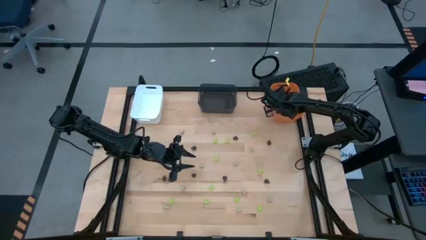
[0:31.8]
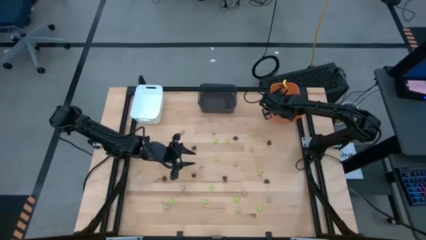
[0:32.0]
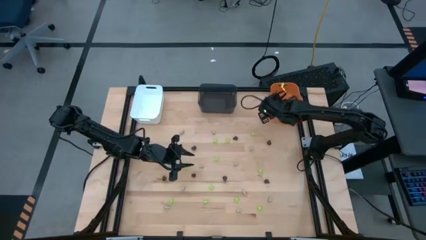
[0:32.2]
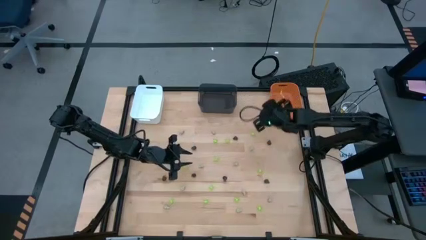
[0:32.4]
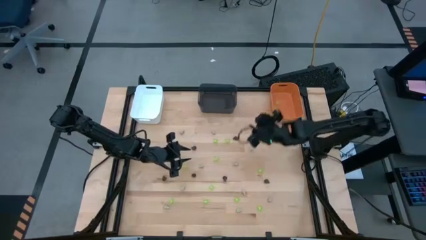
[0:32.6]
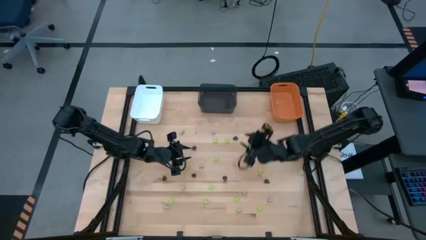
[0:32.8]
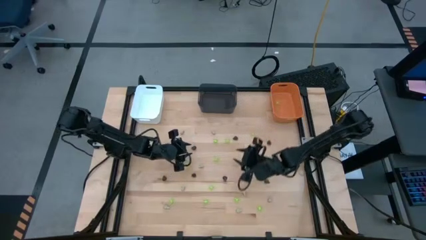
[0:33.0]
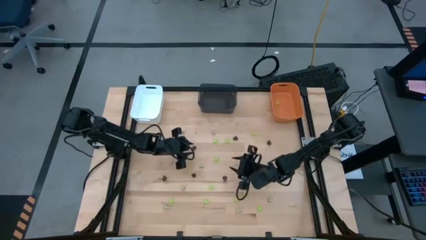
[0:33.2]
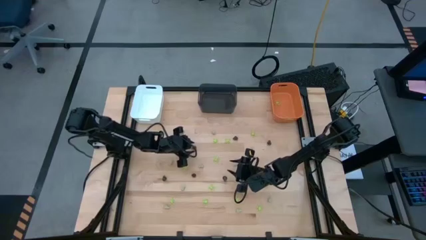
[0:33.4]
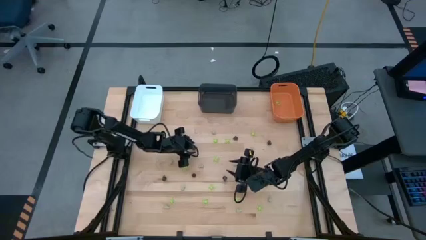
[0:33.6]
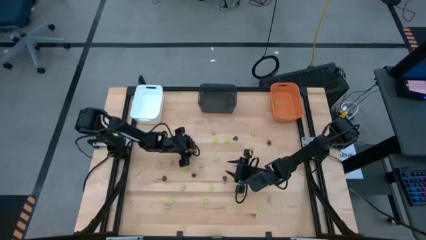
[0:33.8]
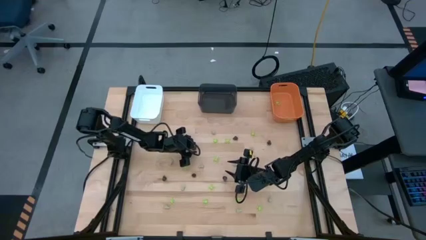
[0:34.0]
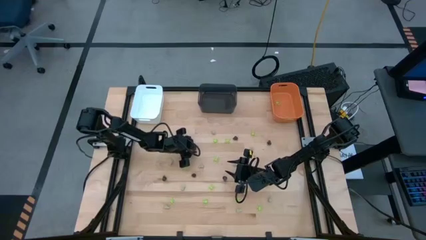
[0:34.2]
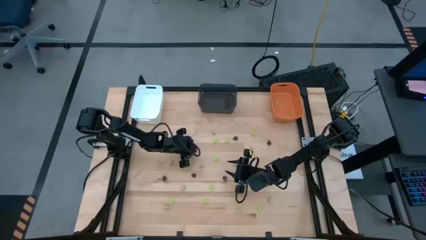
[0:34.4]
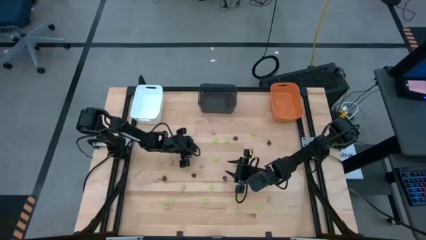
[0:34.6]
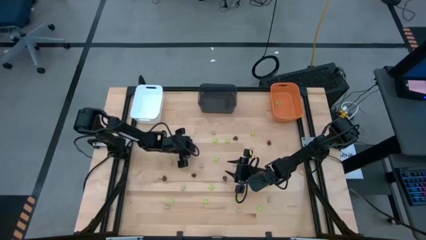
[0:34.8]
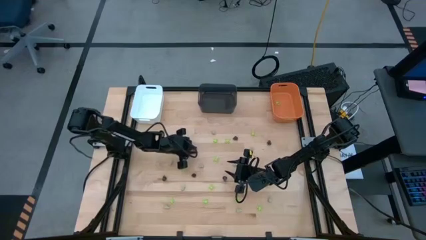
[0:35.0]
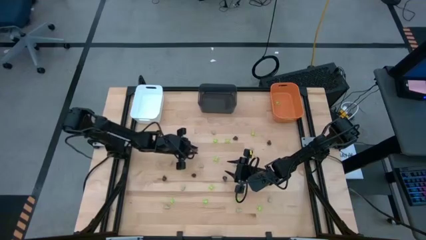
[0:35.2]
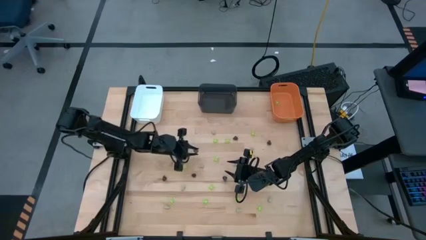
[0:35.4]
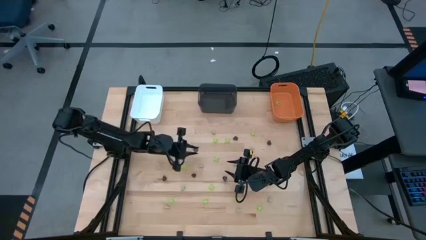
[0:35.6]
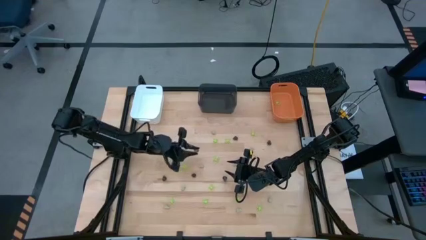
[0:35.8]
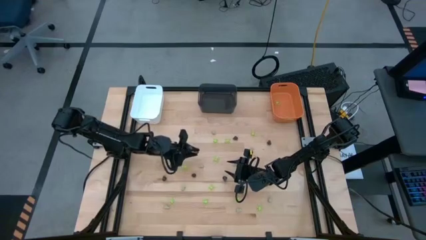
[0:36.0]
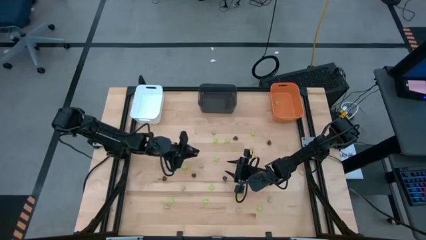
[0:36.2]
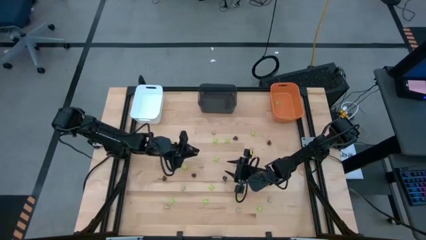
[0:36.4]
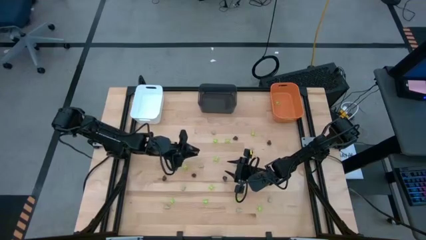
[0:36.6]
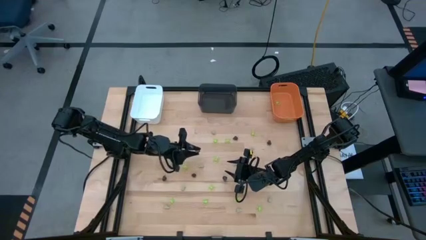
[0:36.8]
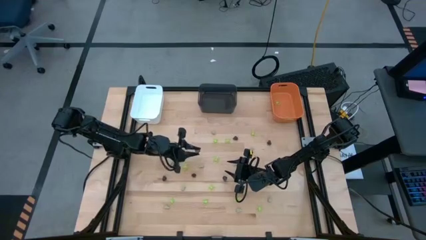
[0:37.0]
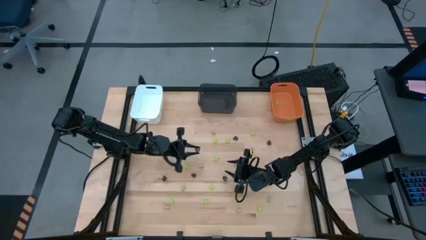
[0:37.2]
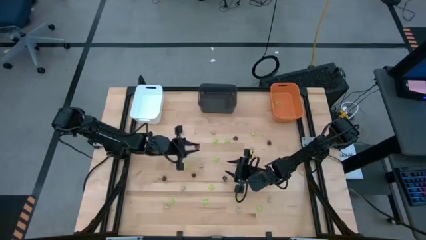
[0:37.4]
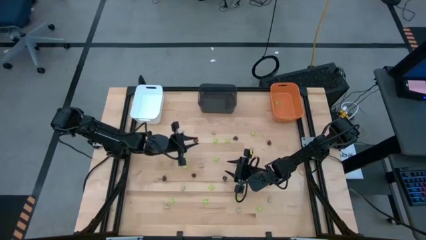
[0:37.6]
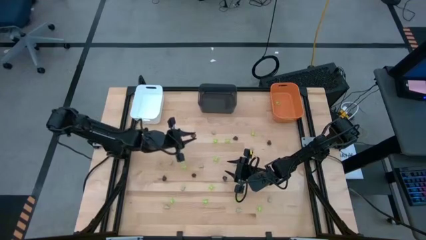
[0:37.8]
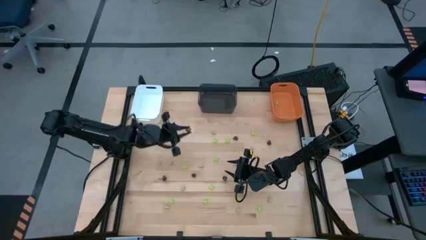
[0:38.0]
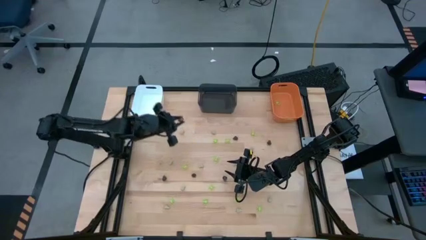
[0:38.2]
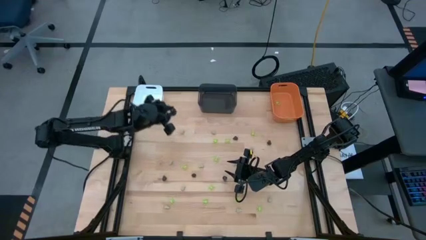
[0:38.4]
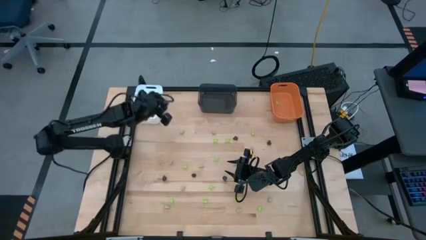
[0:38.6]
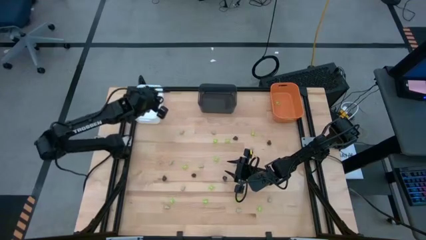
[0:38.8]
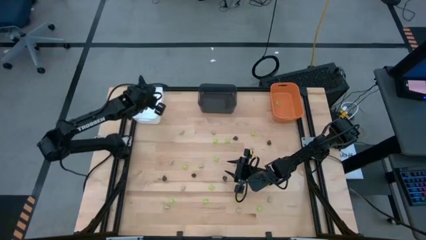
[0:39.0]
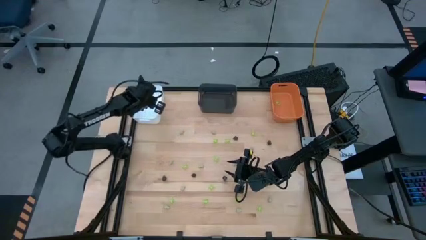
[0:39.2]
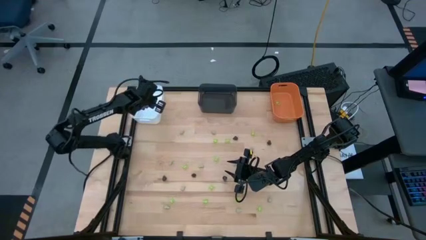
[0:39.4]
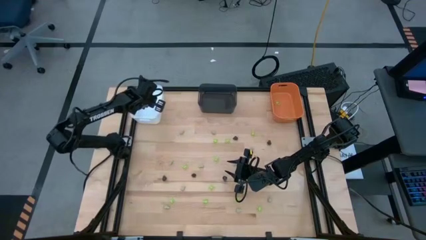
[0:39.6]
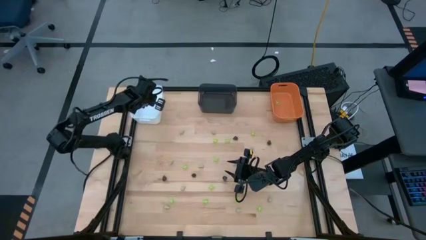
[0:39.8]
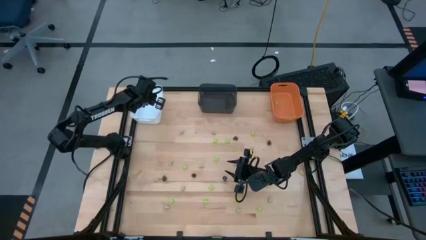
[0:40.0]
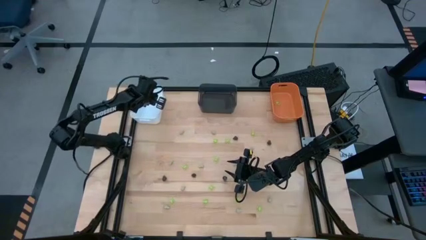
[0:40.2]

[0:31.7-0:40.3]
Task: Sort Halloween decoration
Put the black toy skull into the white bin

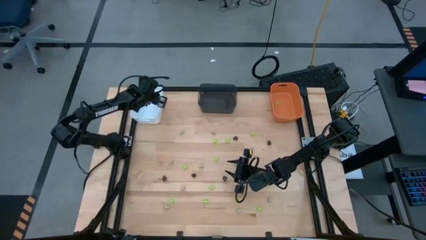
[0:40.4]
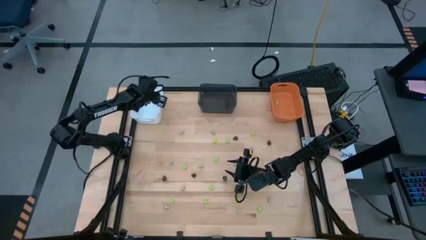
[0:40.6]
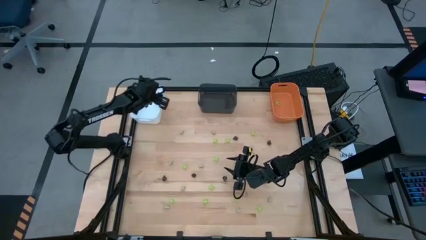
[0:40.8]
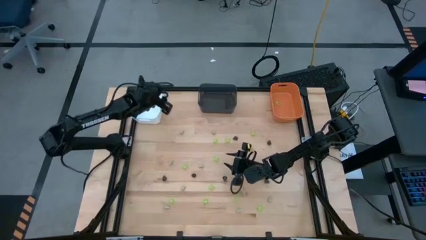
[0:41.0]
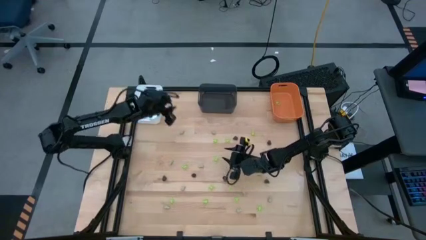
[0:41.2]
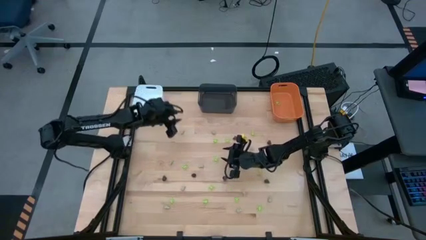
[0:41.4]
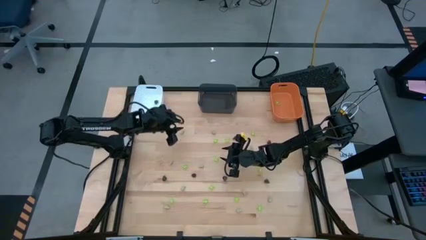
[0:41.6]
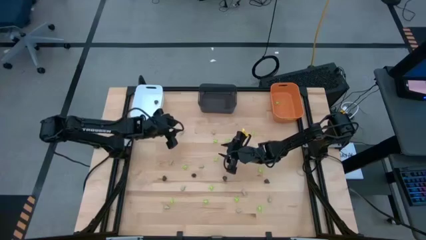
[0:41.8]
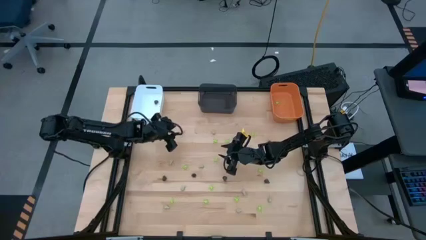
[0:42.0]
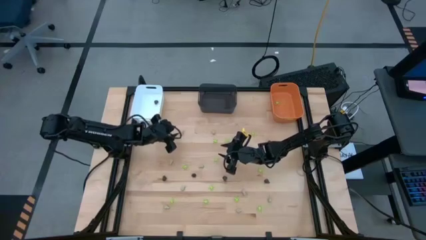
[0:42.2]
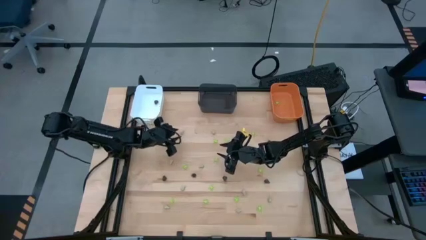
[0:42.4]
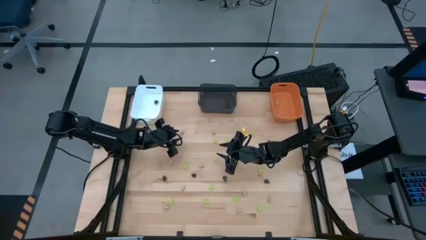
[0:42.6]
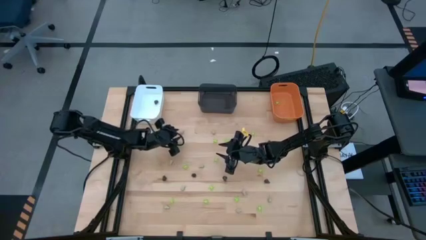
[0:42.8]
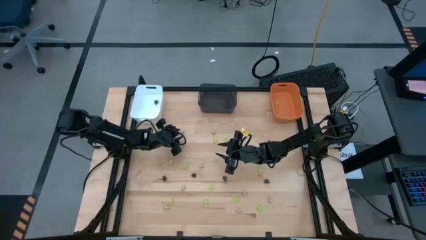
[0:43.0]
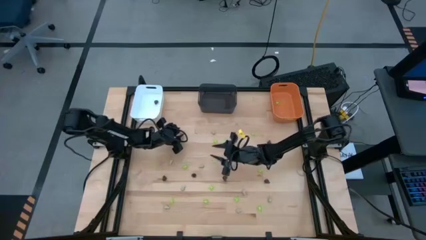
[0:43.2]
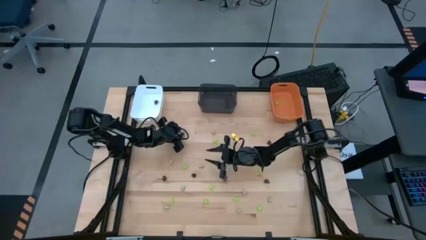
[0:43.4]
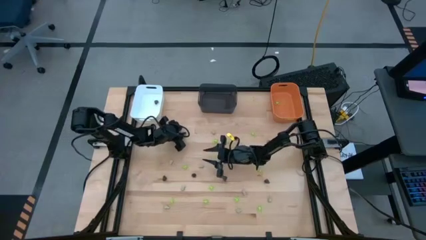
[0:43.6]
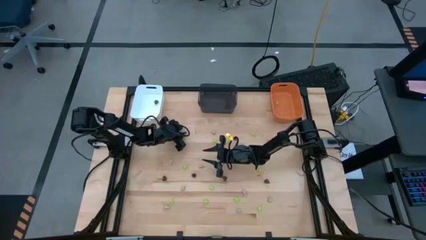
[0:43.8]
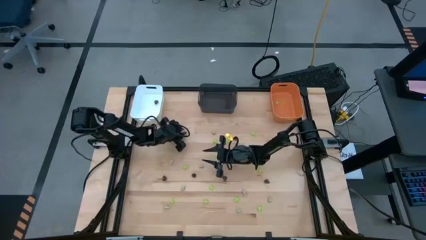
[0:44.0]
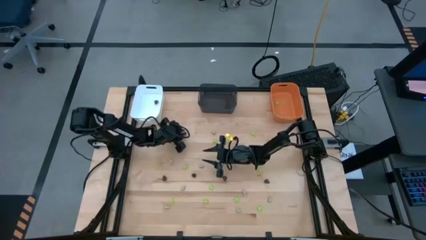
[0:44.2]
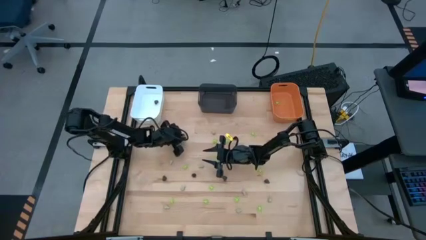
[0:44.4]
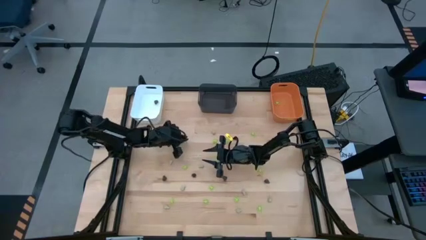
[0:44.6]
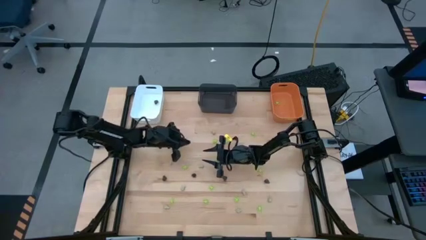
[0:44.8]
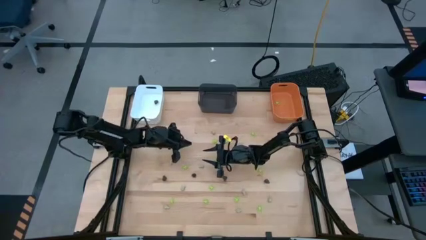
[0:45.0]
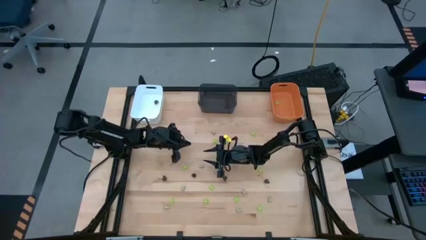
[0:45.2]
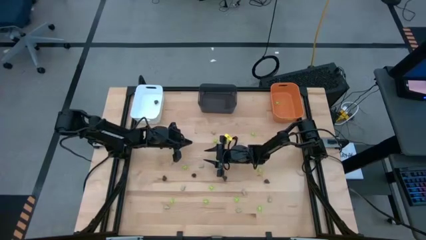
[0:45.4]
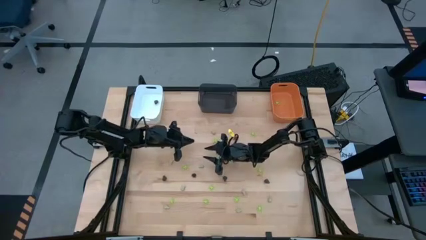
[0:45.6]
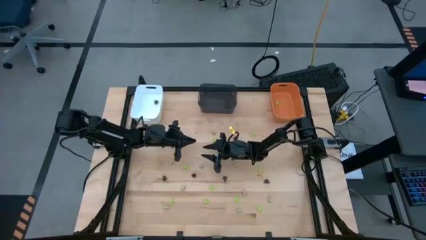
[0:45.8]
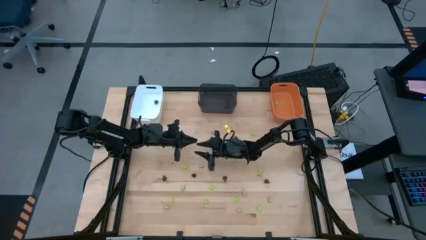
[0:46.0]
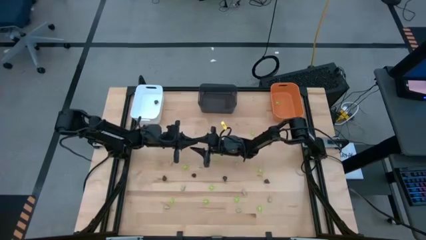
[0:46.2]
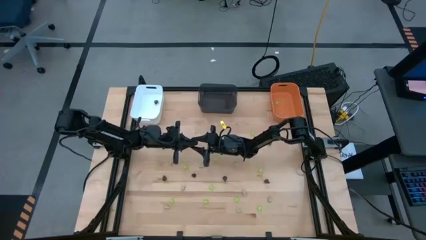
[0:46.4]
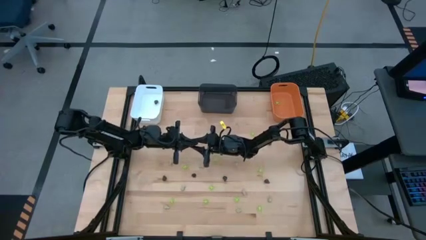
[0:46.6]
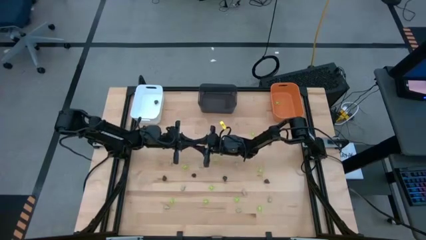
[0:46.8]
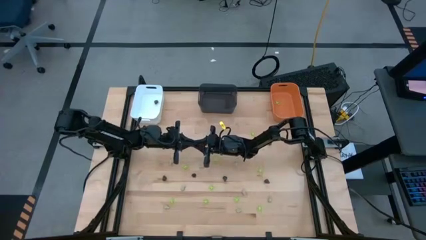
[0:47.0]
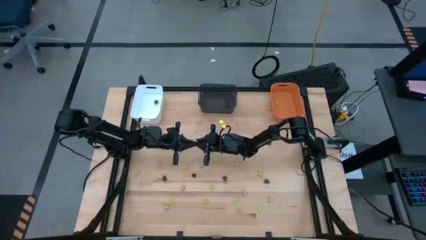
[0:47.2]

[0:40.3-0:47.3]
Put the white toy skull into the black bin
